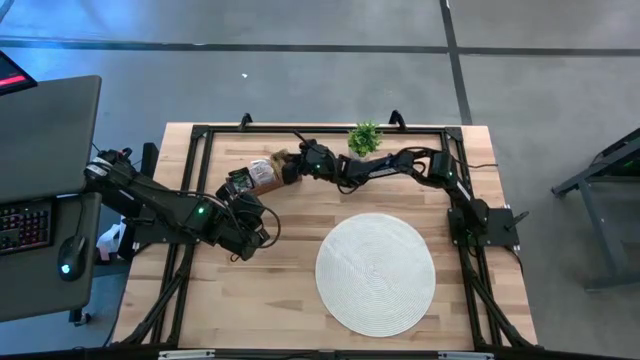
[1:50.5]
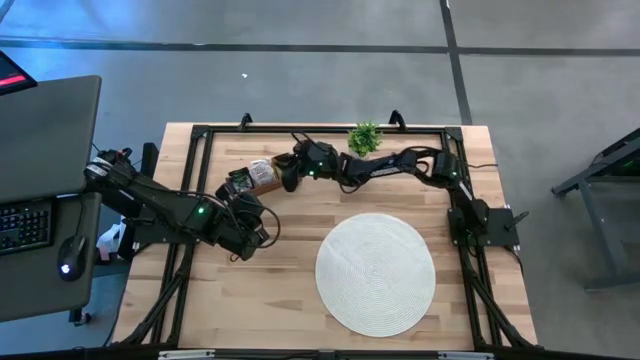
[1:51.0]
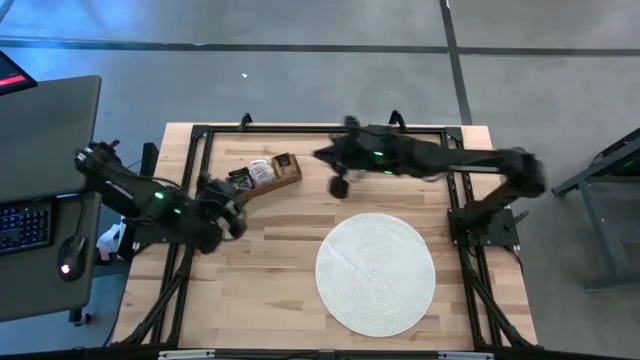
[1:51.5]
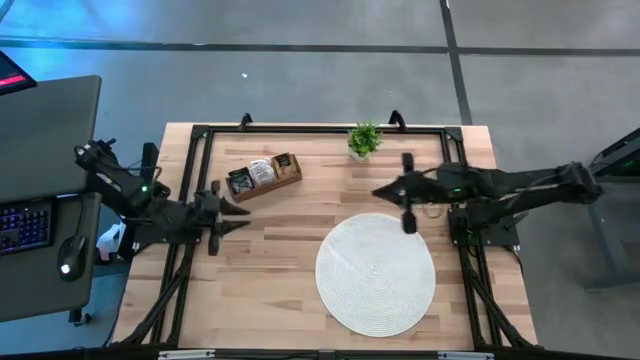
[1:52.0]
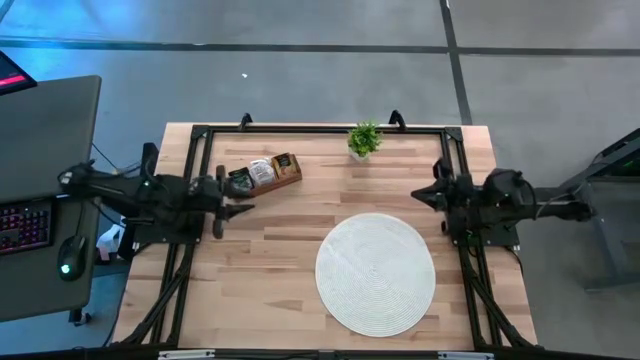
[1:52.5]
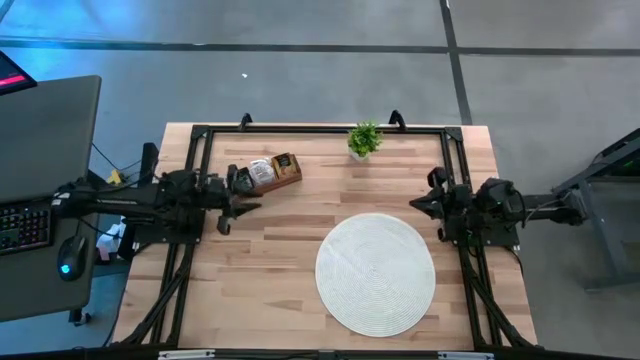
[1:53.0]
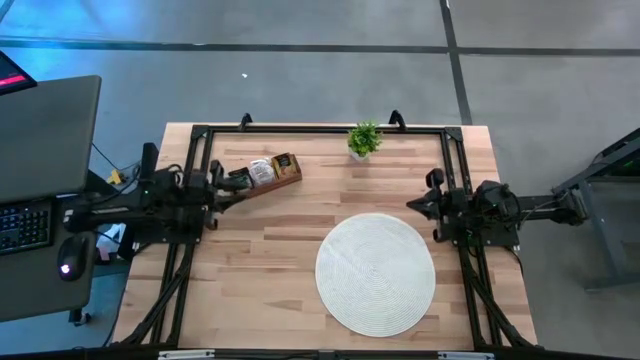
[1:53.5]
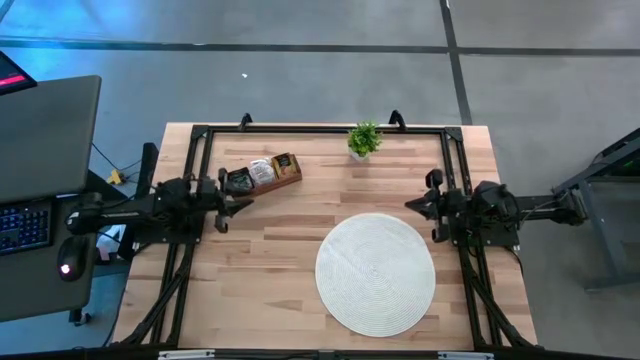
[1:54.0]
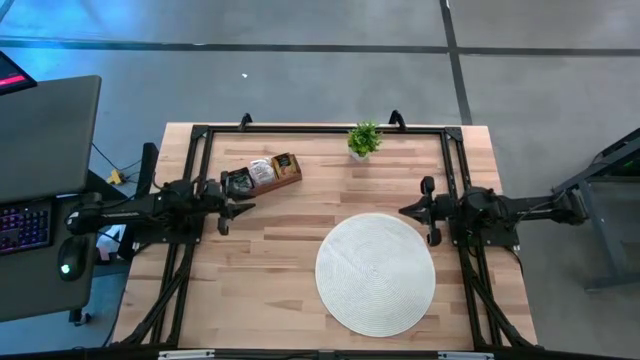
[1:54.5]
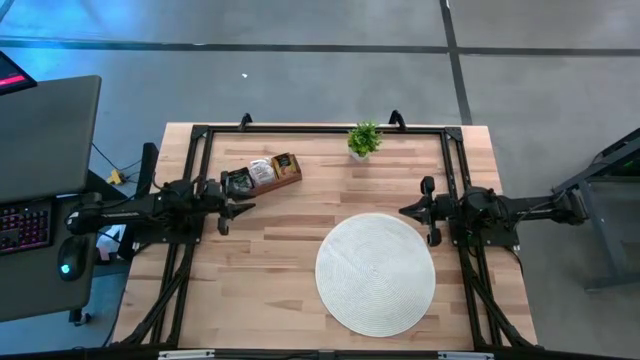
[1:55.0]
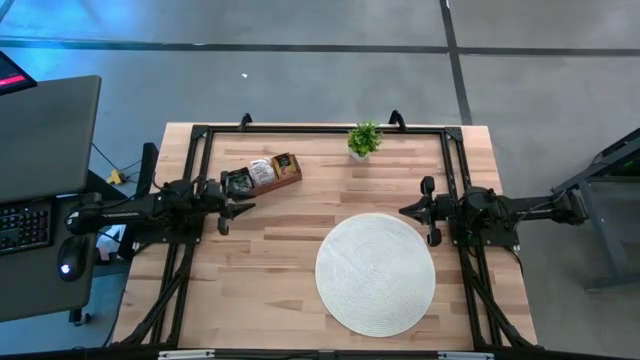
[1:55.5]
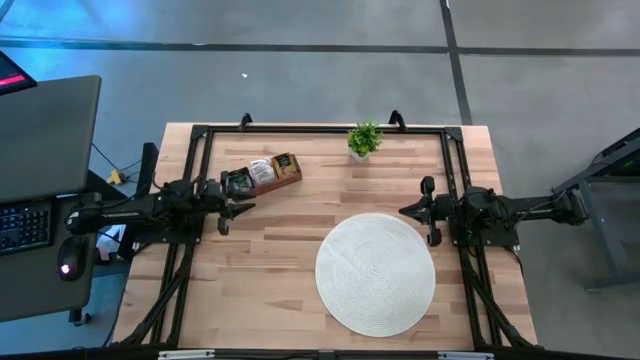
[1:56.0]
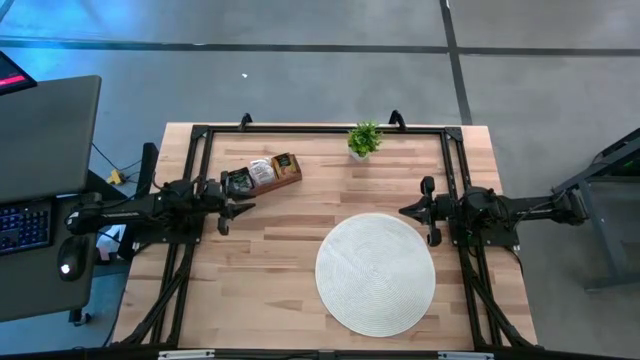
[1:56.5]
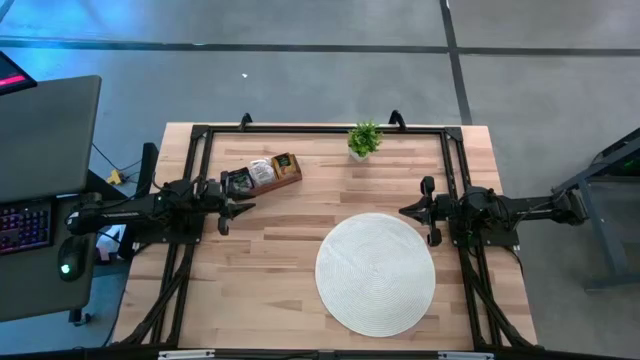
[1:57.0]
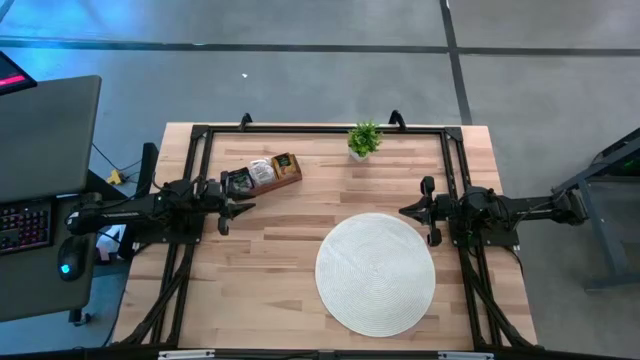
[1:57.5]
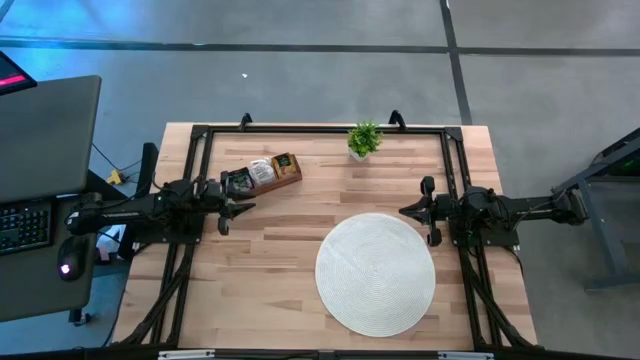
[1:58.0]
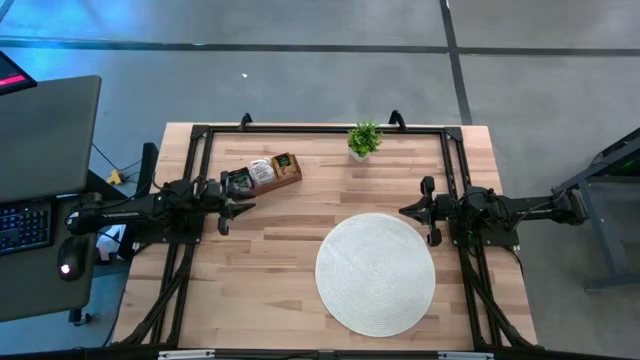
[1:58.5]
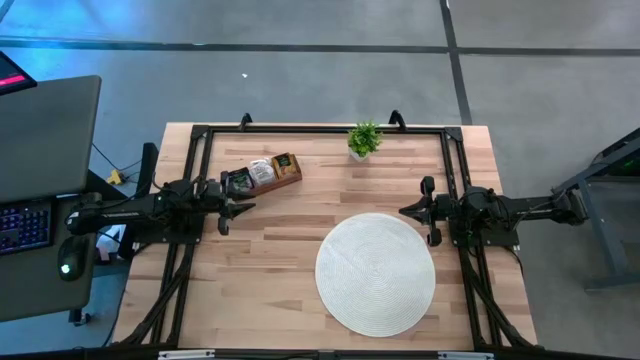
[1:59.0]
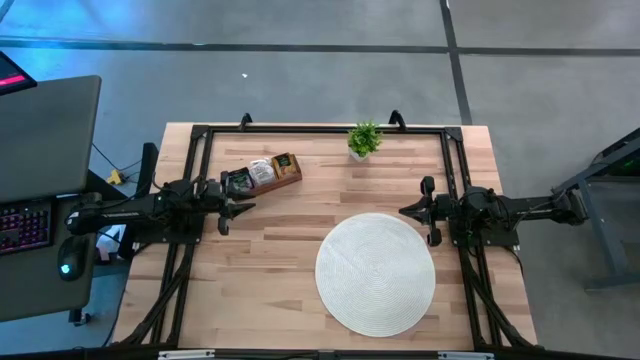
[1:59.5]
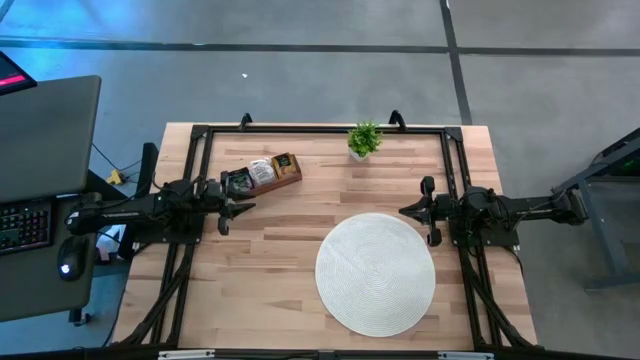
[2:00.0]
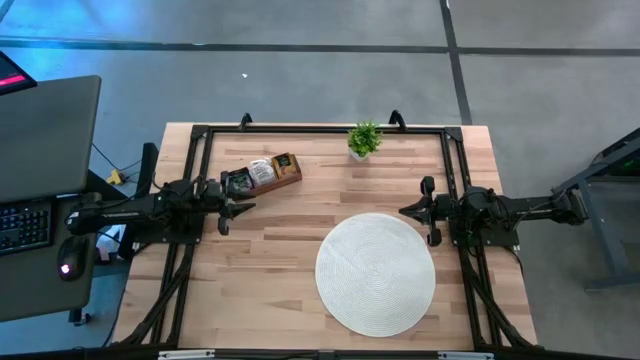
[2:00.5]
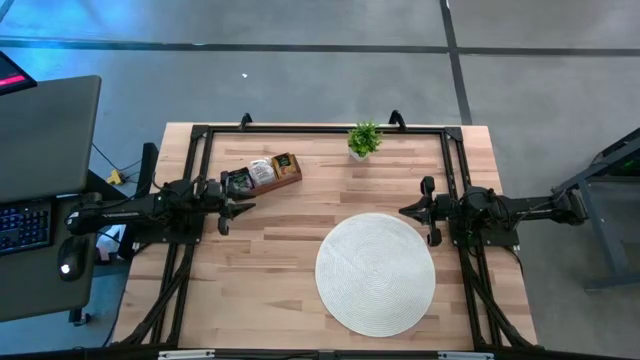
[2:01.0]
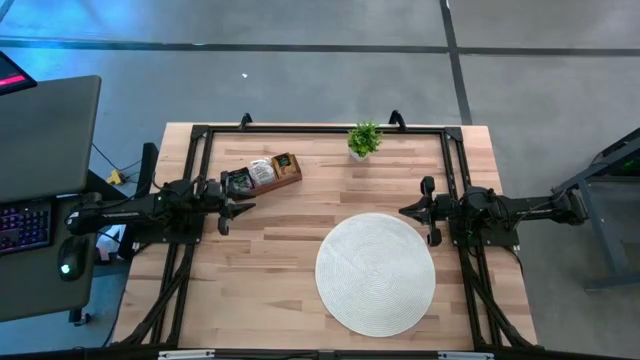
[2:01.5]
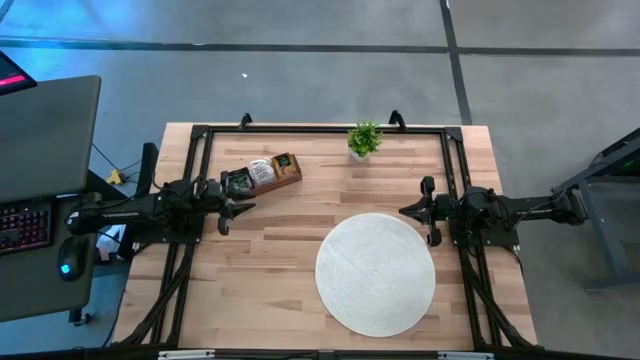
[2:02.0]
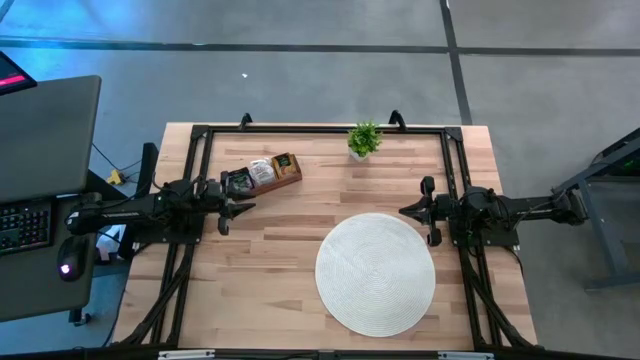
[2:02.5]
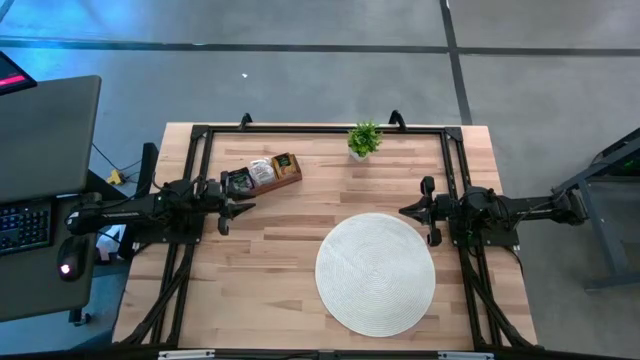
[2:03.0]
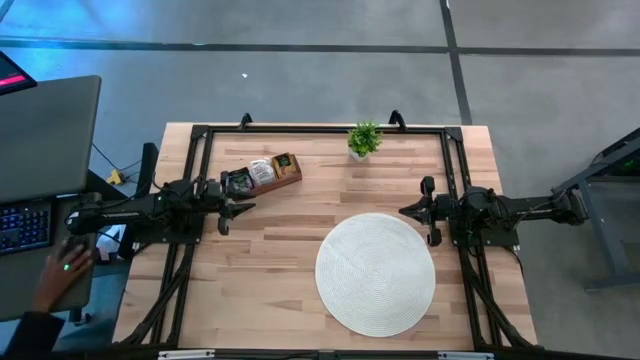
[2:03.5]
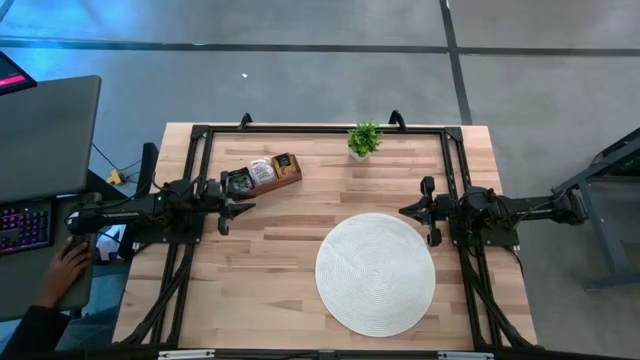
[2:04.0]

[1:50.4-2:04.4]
Task: Pick & Place Tea
Return to Home Position

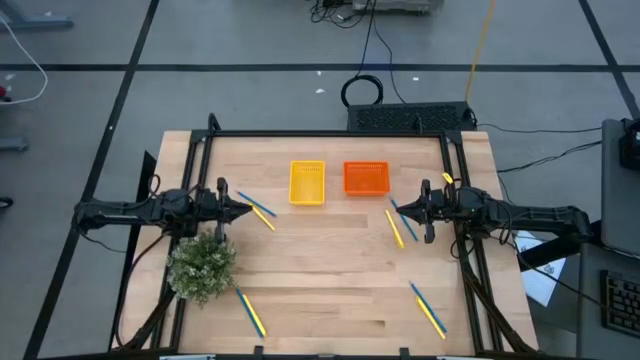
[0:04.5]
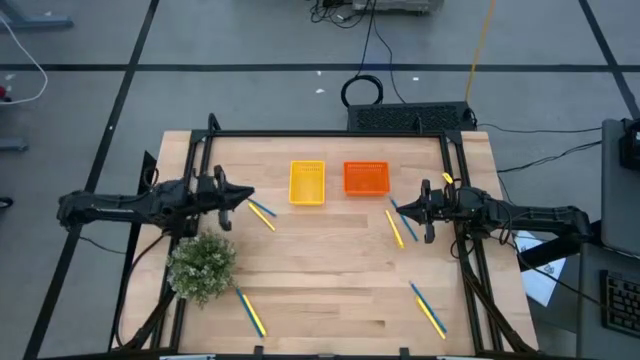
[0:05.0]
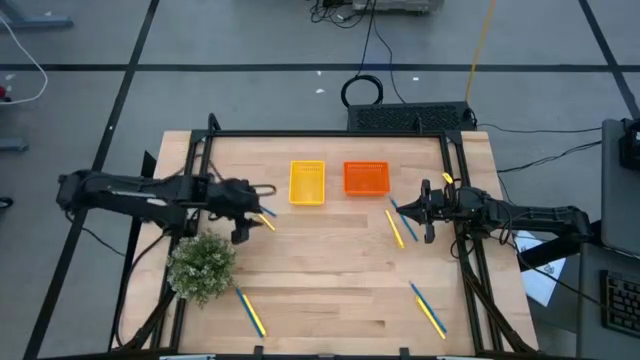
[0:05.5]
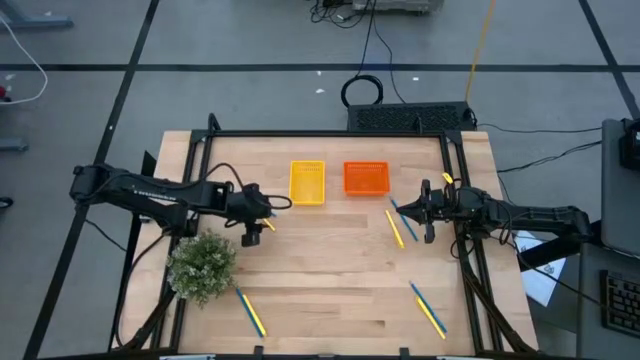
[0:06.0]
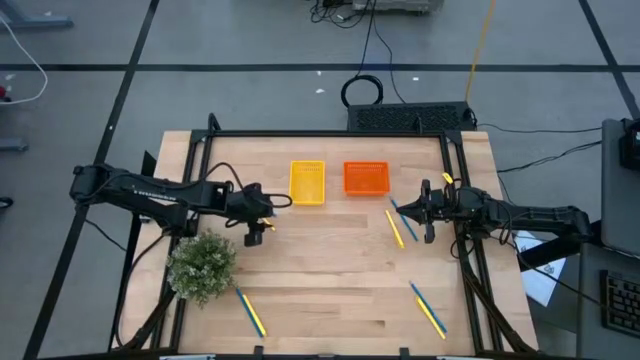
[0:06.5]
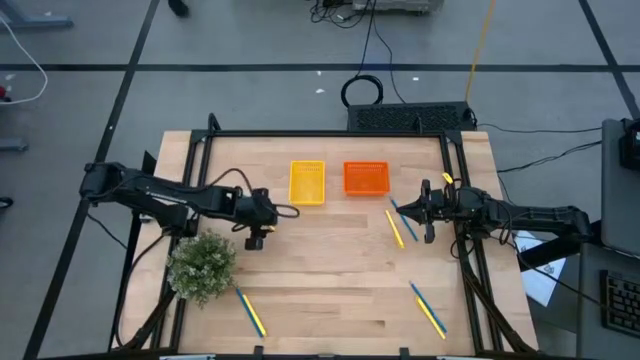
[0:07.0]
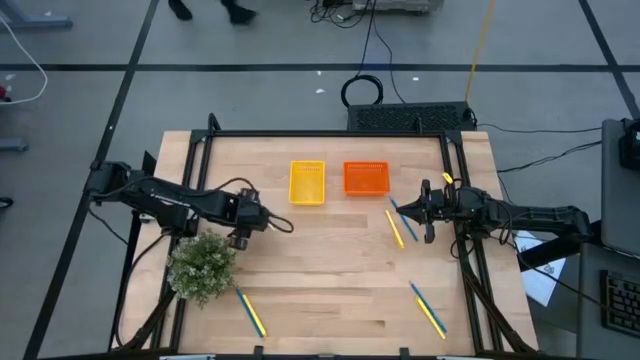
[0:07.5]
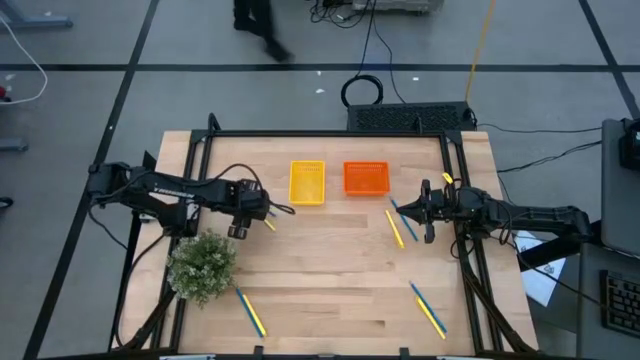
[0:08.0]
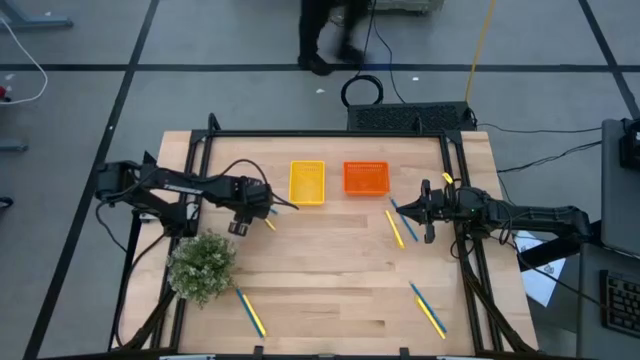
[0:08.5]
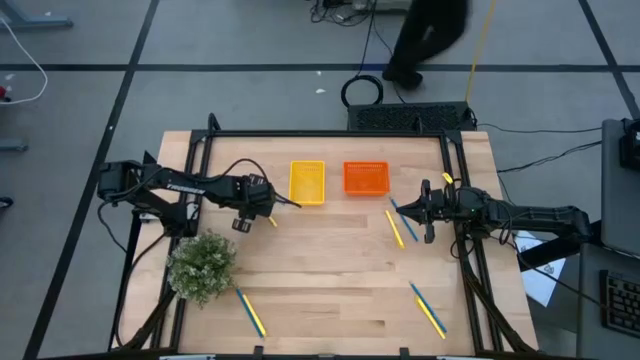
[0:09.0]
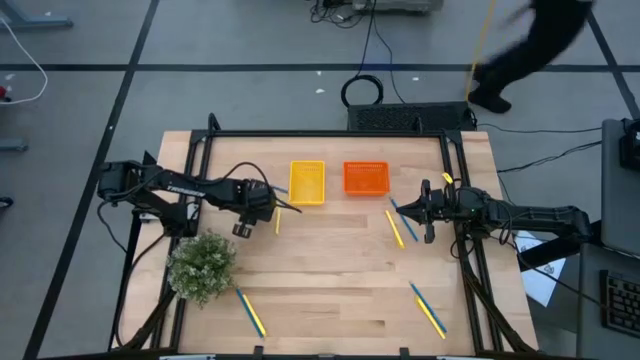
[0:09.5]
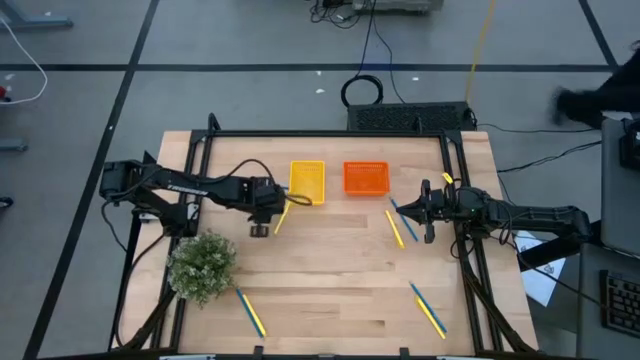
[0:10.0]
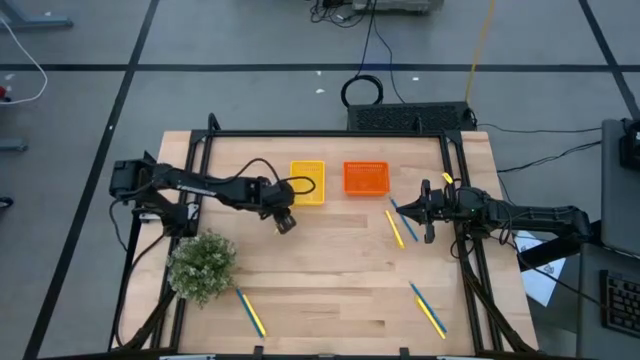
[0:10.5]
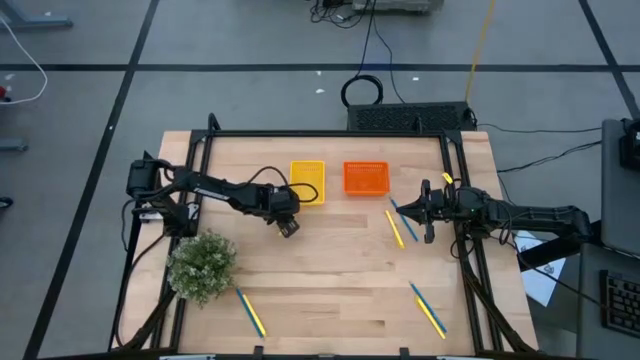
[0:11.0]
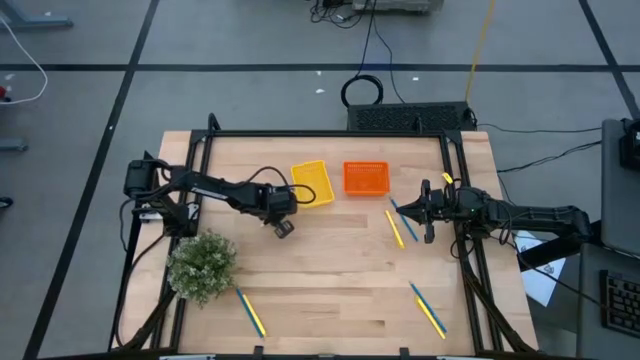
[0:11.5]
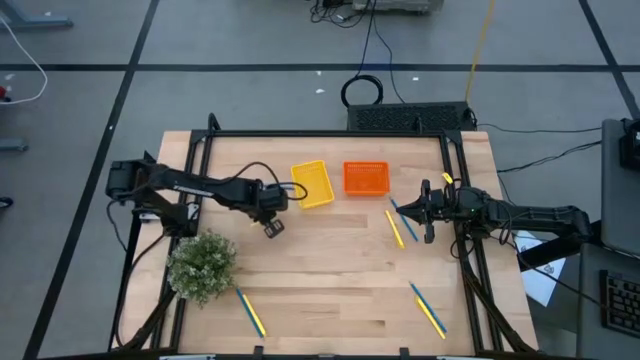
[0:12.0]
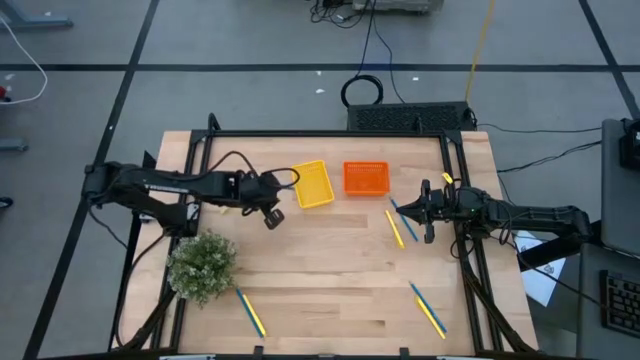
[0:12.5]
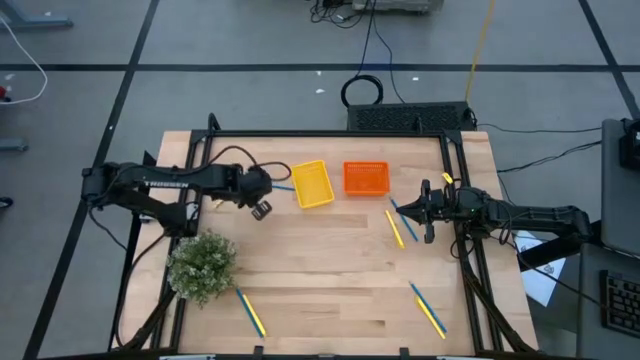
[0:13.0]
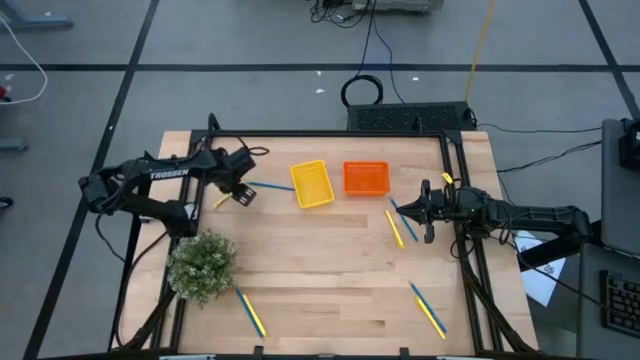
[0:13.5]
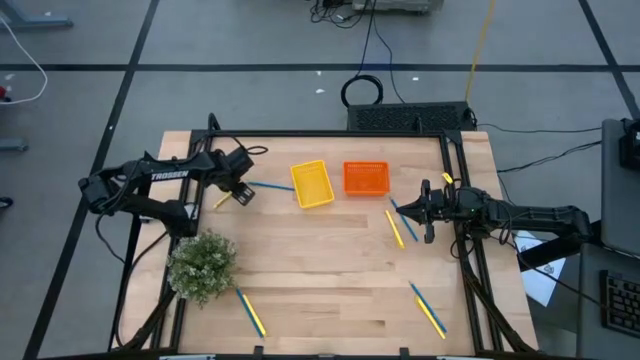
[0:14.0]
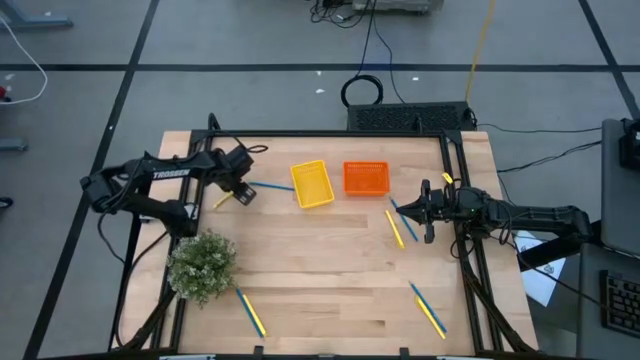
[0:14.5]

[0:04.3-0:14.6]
Task: Sort pens & pencils
Put the top left yellow pen into the yellow basket
